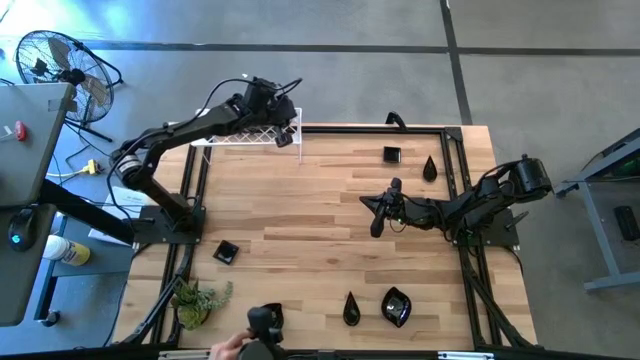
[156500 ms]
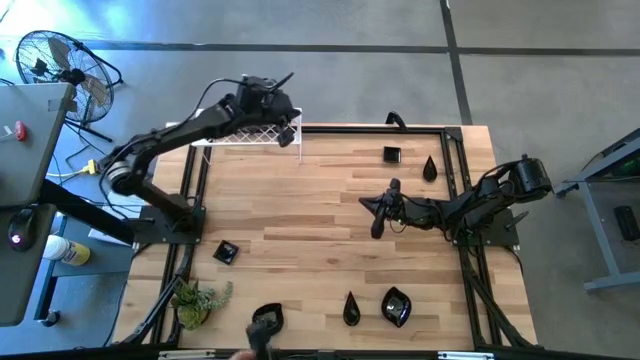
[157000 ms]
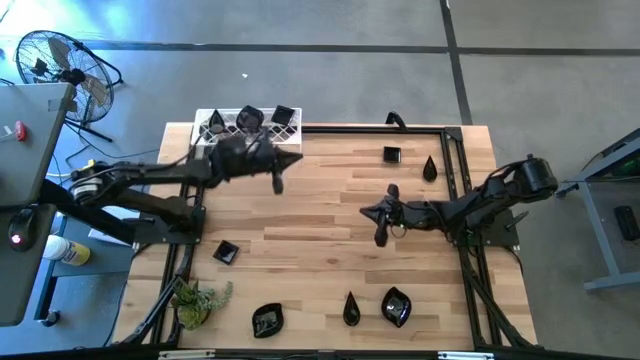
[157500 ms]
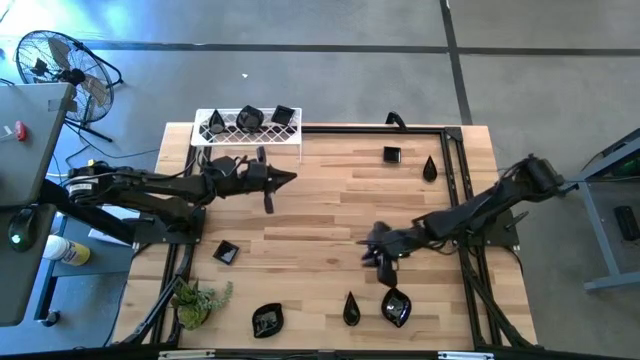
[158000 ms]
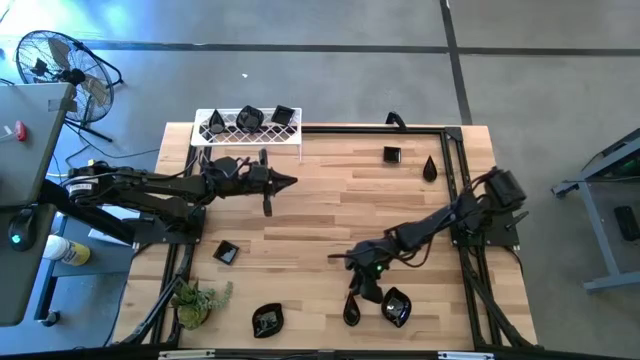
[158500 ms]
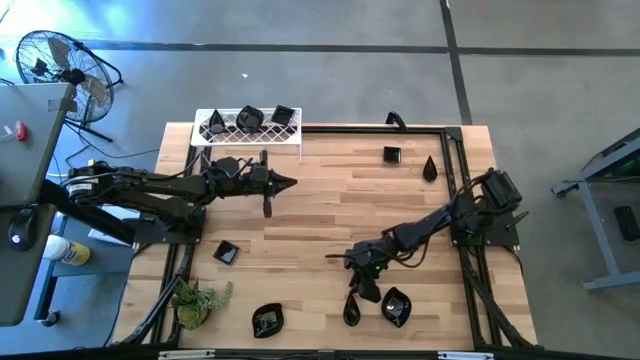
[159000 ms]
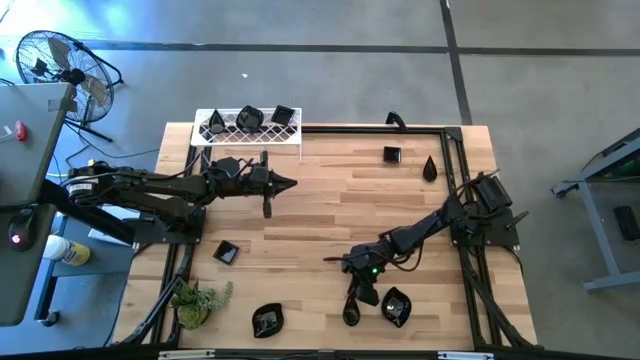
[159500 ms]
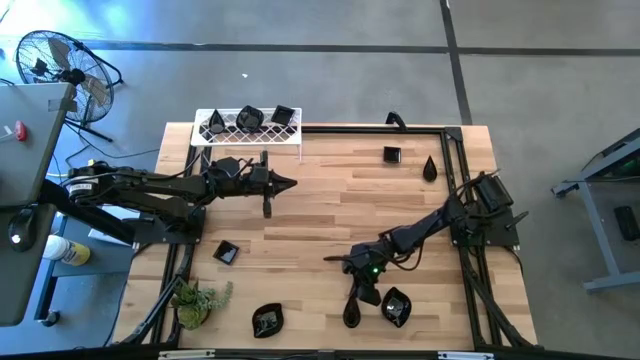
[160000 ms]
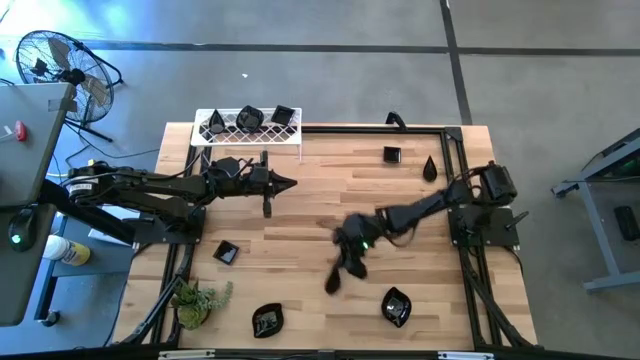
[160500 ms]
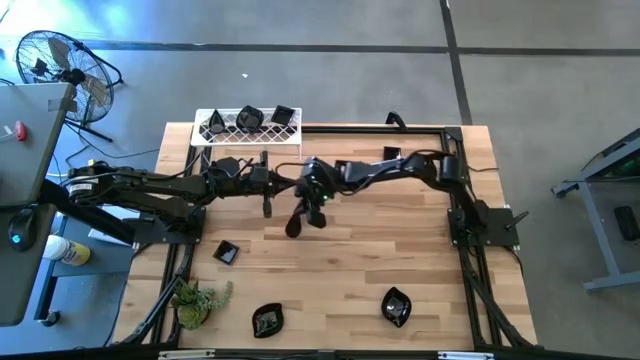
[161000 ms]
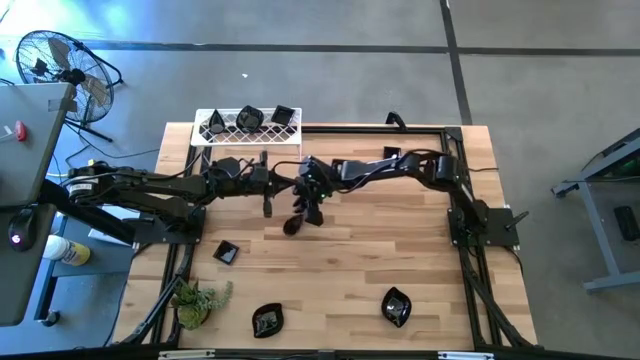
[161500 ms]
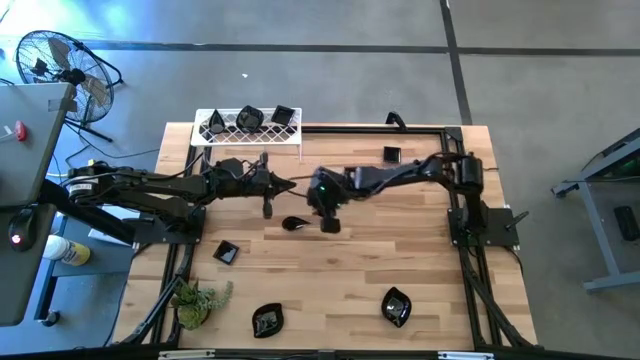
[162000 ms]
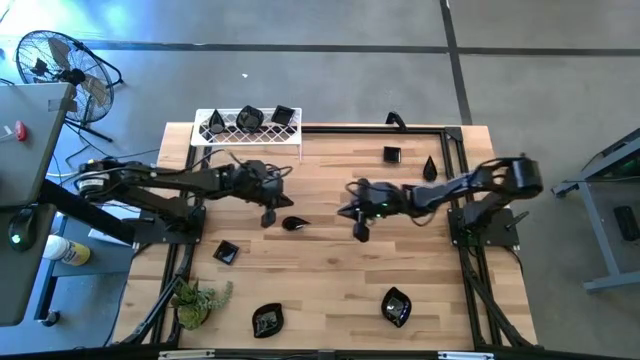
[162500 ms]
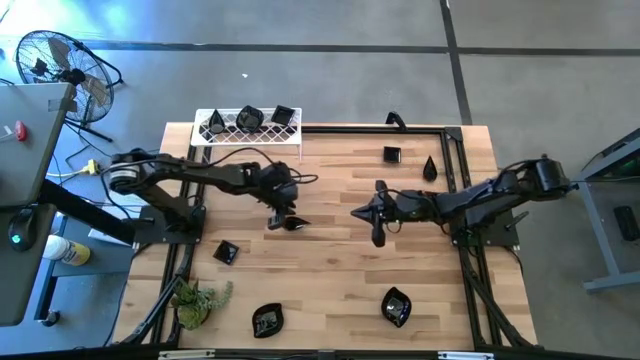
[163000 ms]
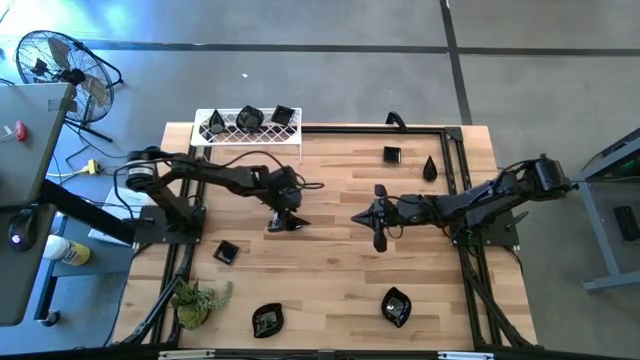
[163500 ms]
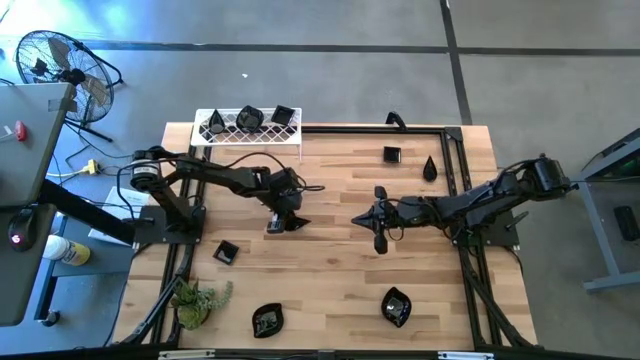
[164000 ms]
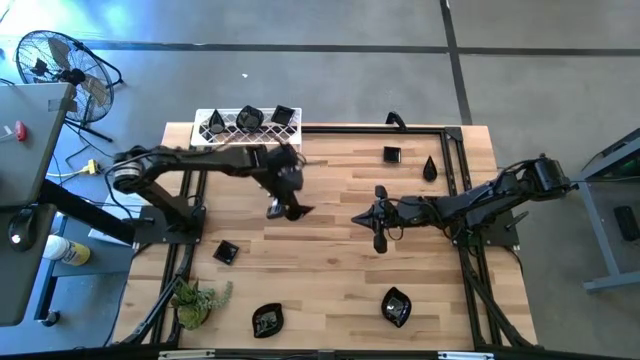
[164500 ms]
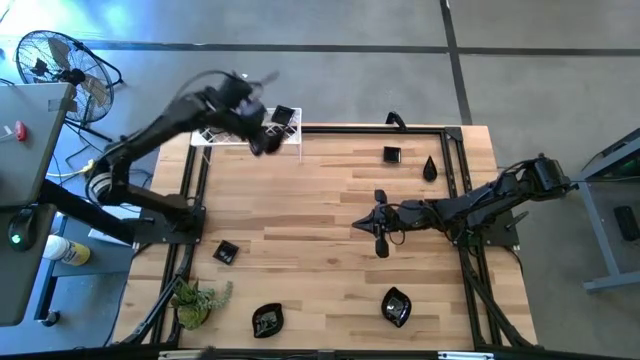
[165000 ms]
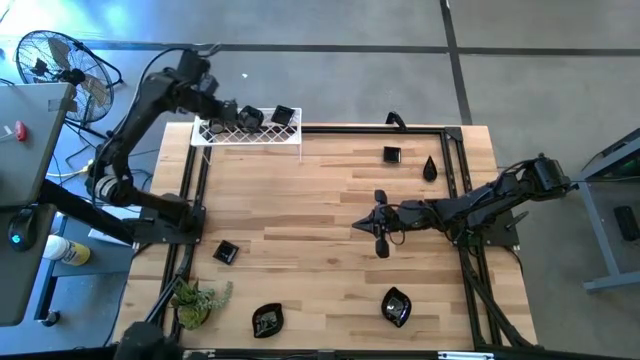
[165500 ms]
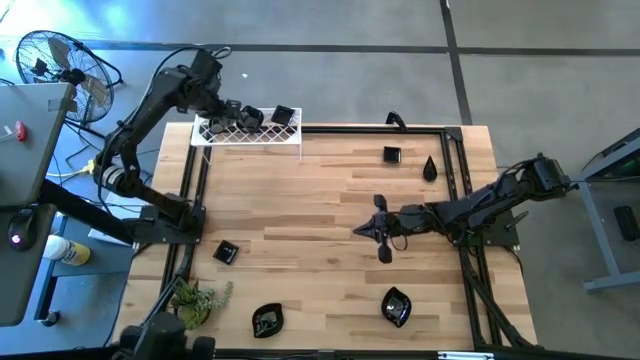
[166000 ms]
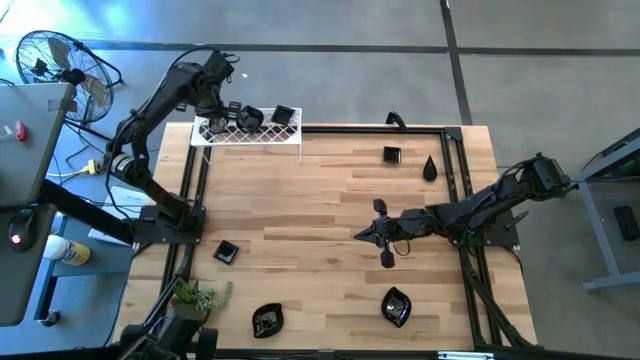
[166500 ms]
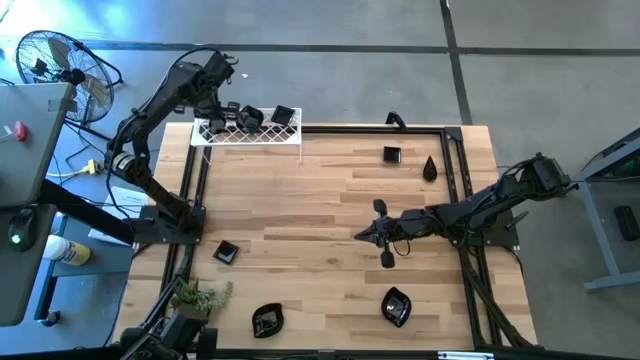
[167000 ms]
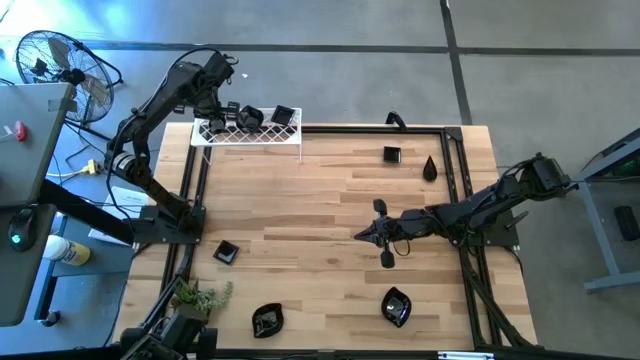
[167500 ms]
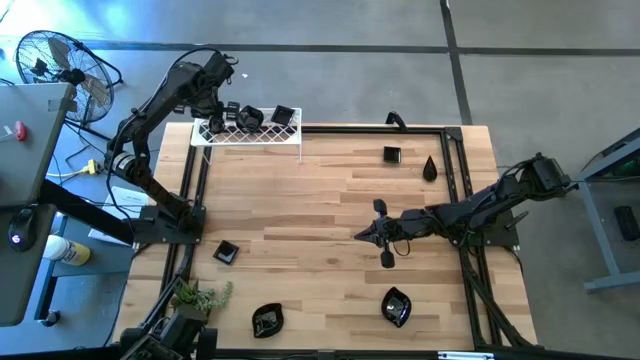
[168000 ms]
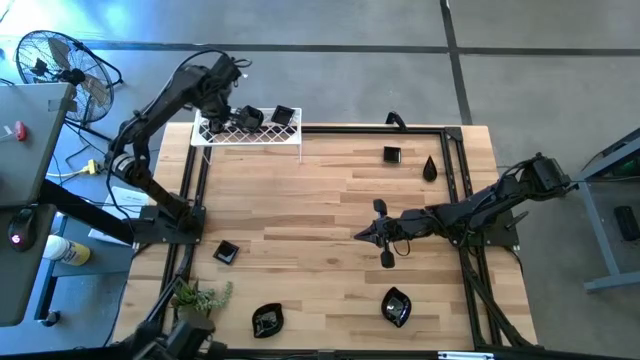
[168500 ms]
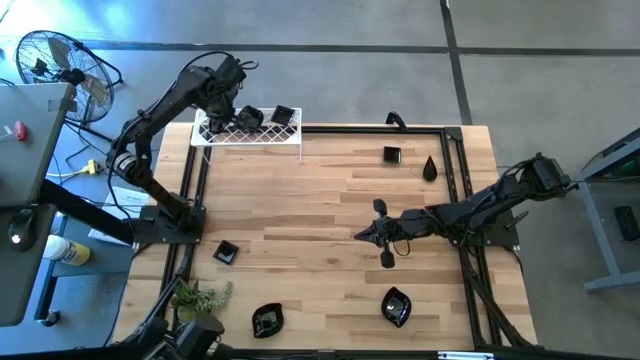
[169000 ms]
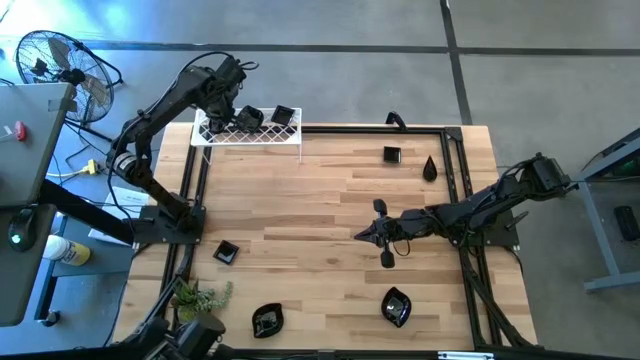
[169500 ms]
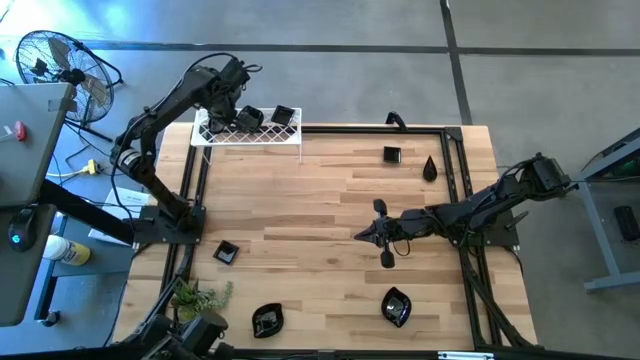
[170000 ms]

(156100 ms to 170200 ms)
Task: Pick & Place Mini shaped plates
Stack the bottom drop-shaped plate on top of the drop-shaped plates on the shelf

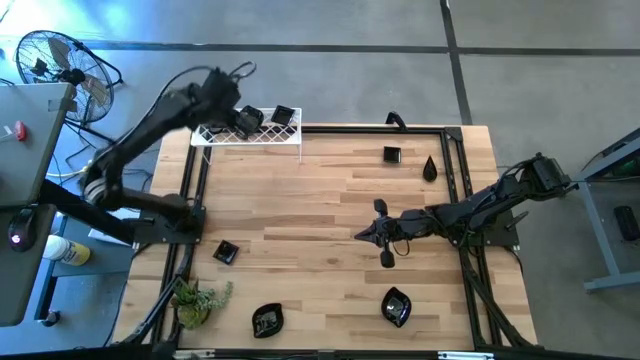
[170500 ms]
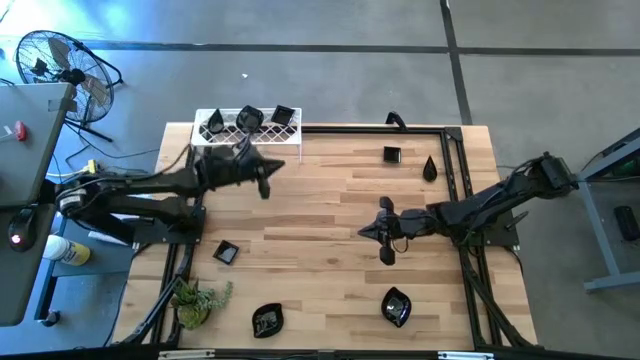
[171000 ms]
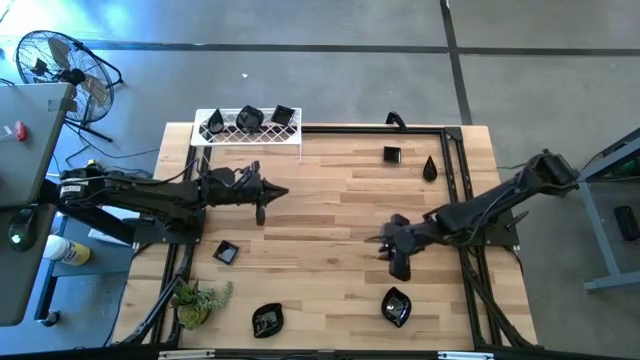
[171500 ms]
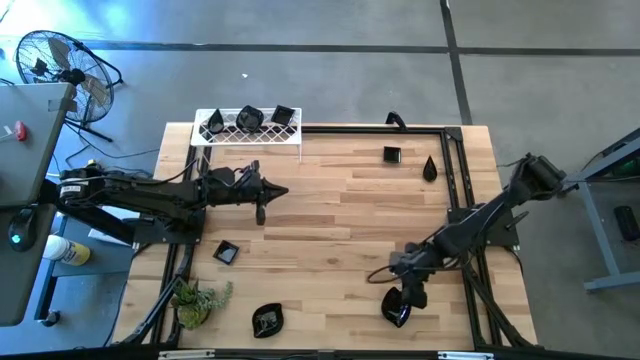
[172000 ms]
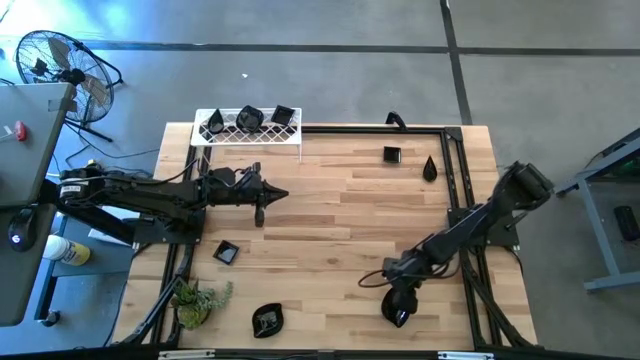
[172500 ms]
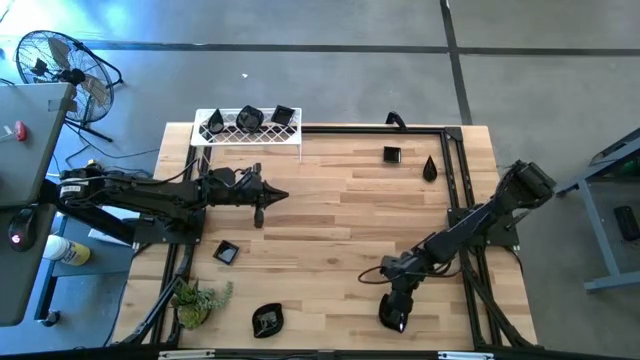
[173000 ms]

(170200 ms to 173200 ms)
Stack the right leaf-shaped plate on top of the leaf-shaped plates on the shelf

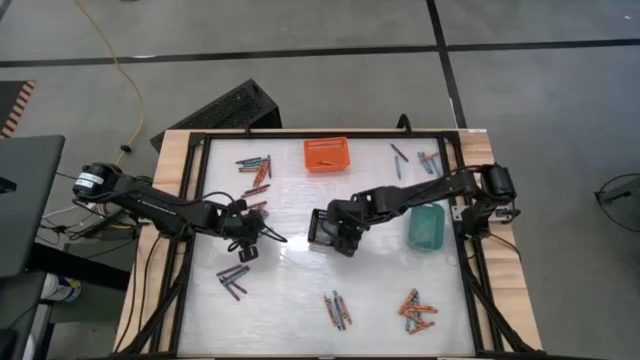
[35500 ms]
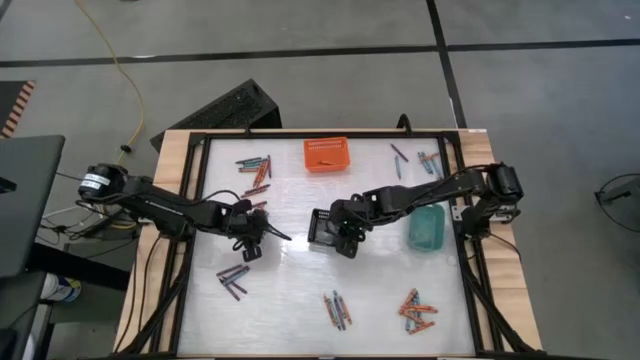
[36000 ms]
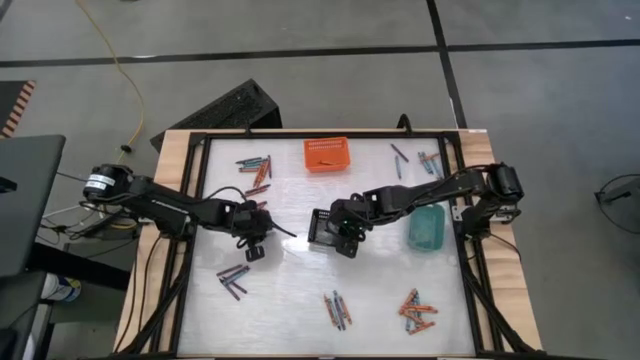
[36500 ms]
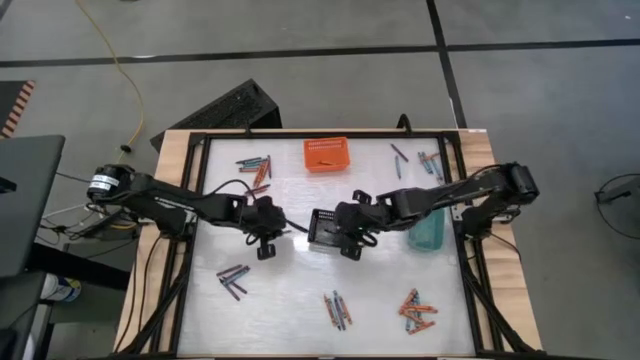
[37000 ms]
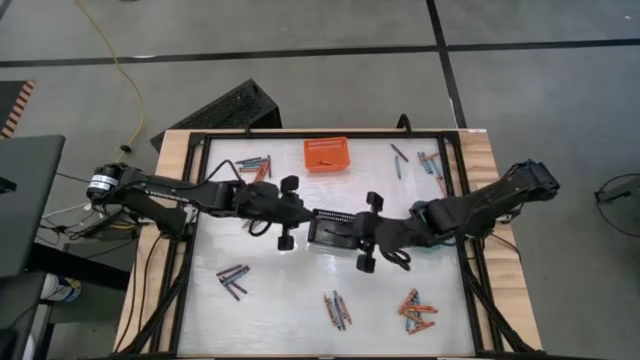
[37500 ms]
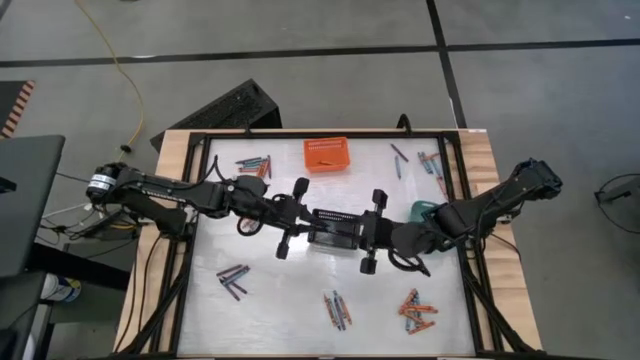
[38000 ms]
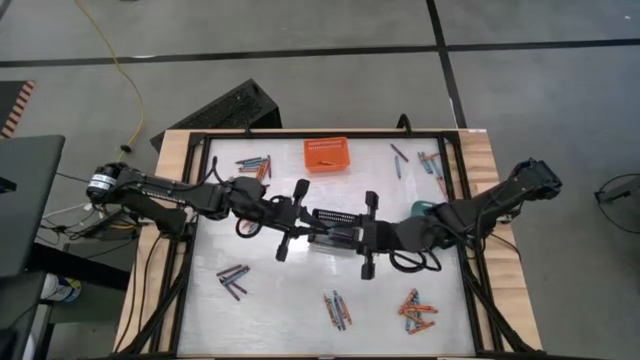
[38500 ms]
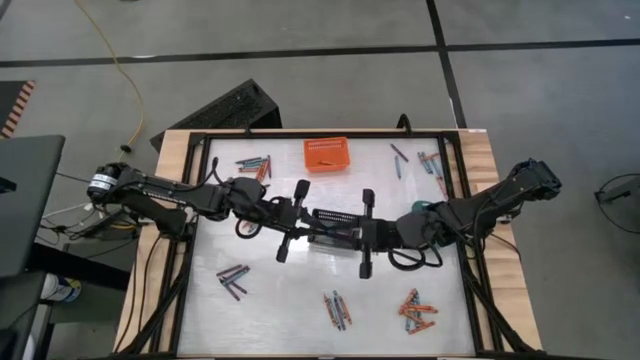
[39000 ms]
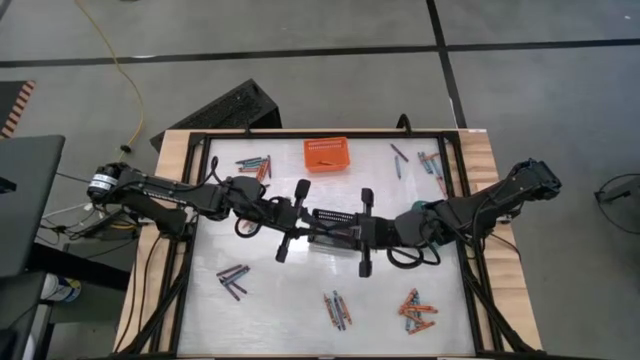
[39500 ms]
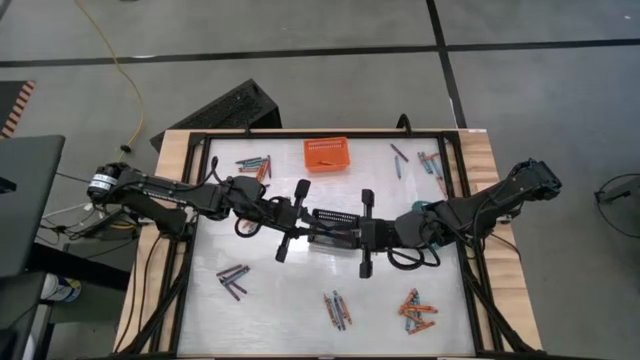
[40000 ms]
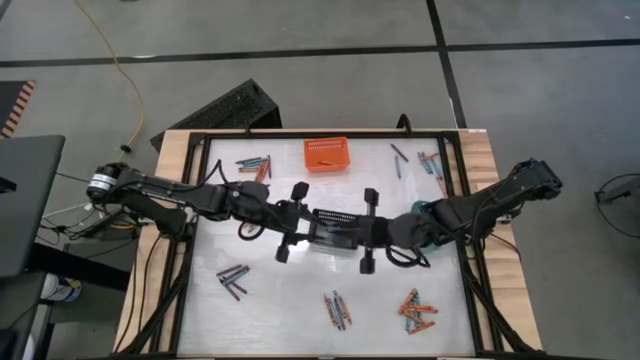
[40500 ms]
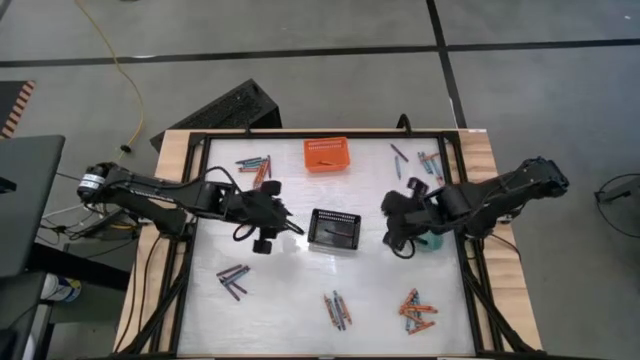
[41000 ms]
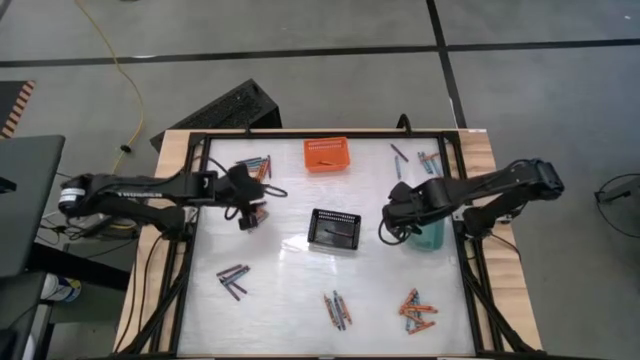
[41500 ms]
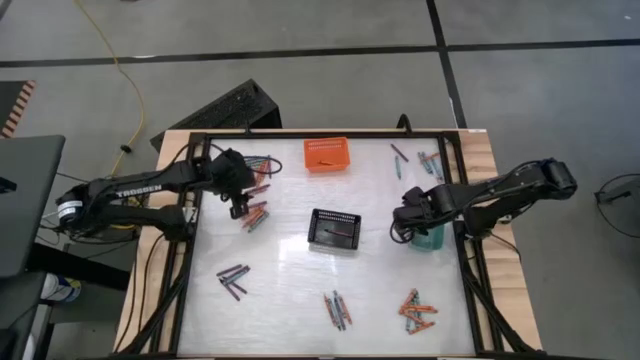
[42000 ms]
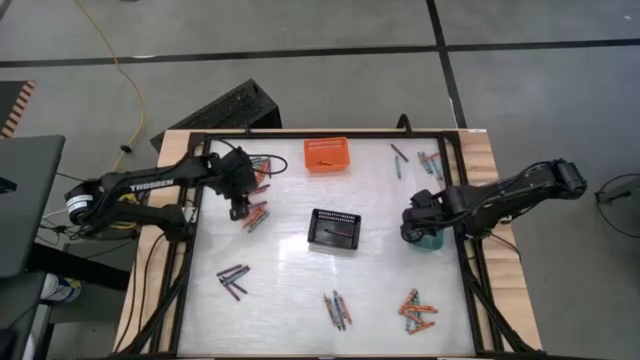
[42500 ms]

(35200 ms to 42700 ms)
Task: Sort crayons
Put the light blue green crayon into the green bin
